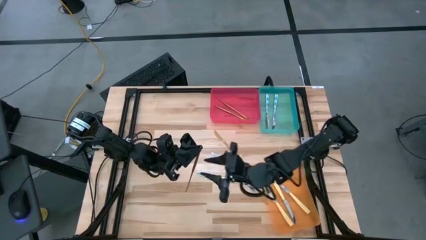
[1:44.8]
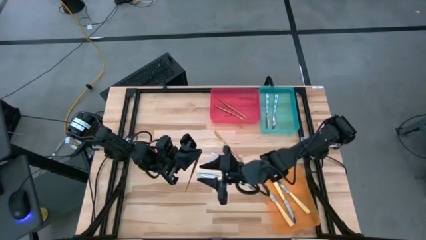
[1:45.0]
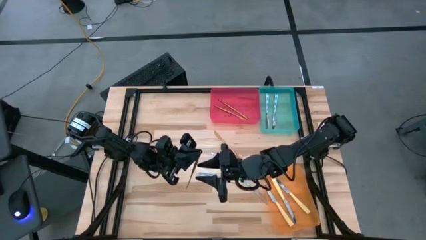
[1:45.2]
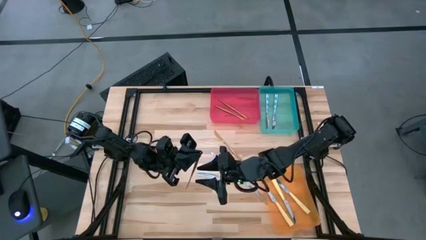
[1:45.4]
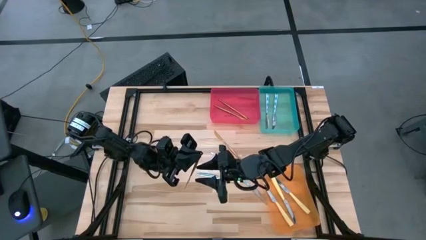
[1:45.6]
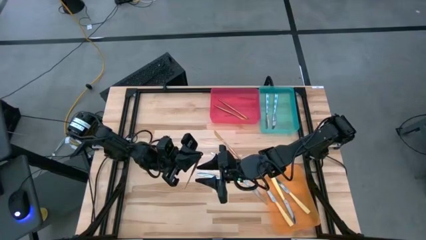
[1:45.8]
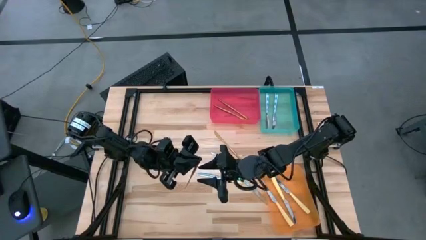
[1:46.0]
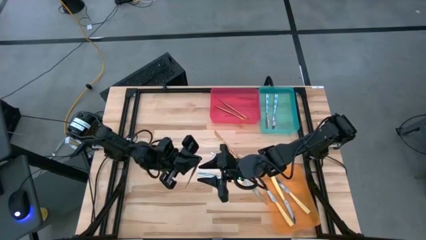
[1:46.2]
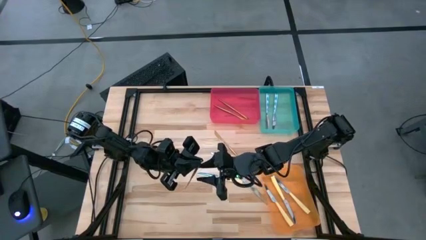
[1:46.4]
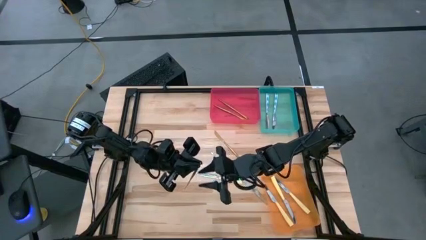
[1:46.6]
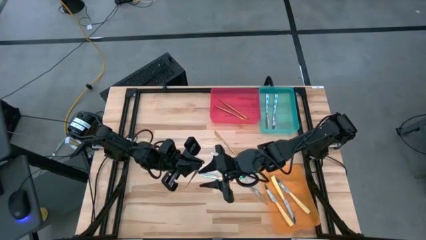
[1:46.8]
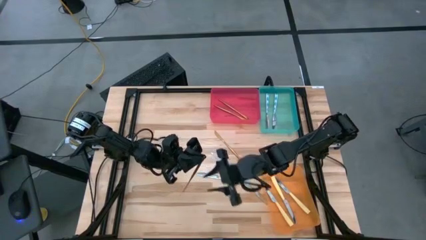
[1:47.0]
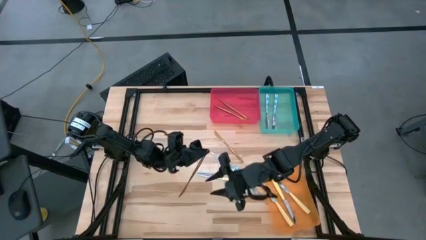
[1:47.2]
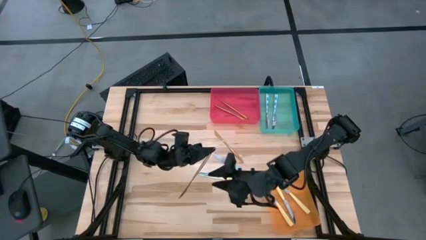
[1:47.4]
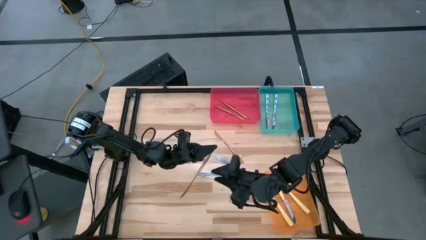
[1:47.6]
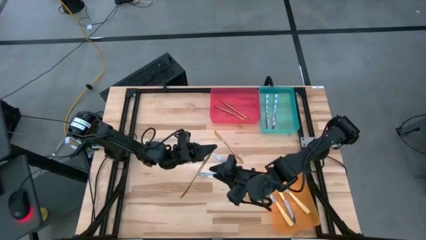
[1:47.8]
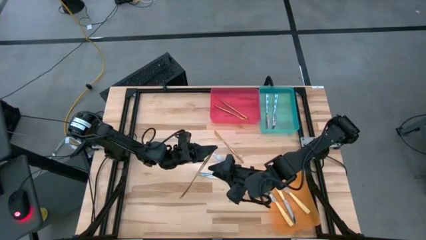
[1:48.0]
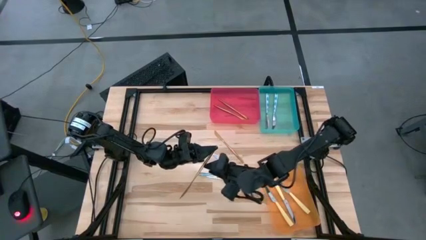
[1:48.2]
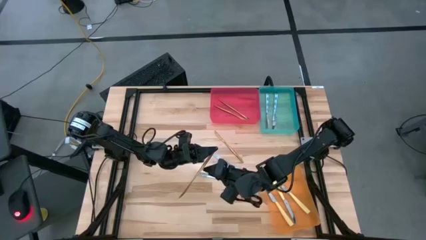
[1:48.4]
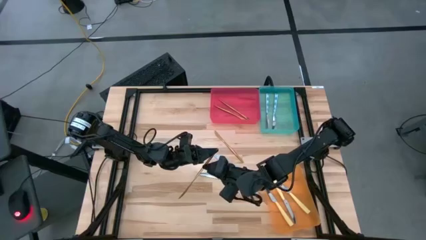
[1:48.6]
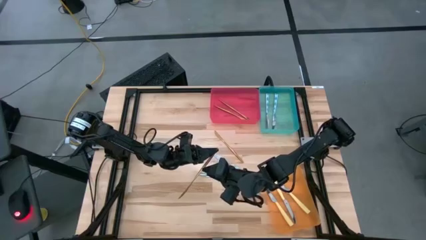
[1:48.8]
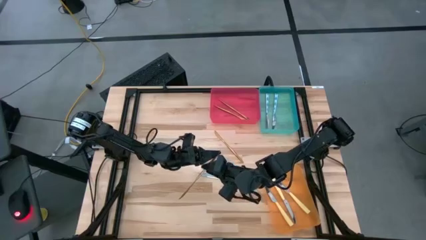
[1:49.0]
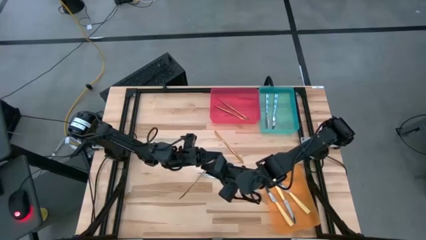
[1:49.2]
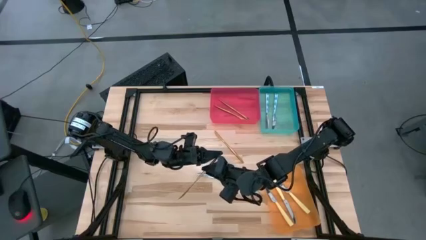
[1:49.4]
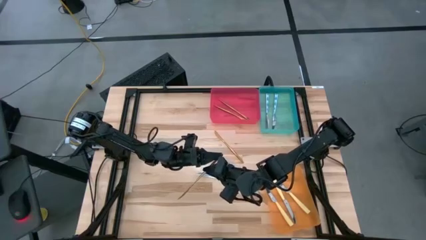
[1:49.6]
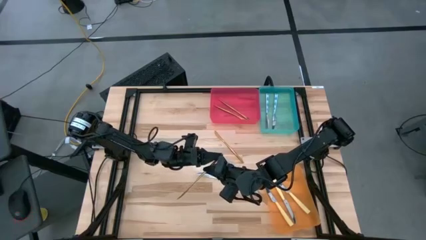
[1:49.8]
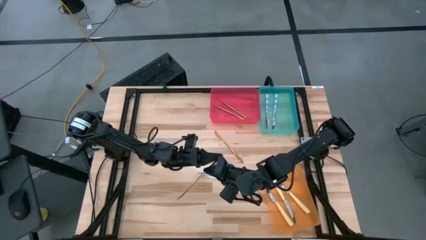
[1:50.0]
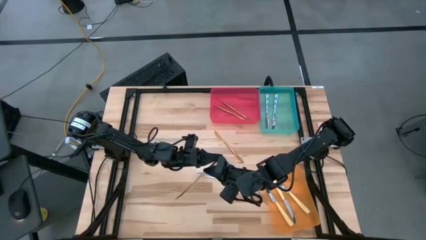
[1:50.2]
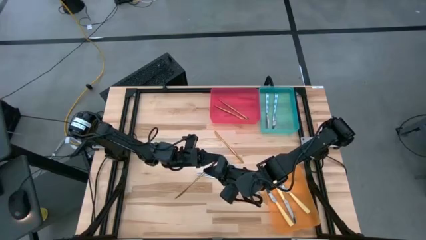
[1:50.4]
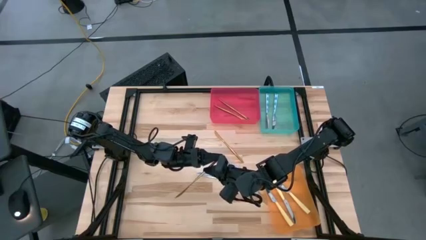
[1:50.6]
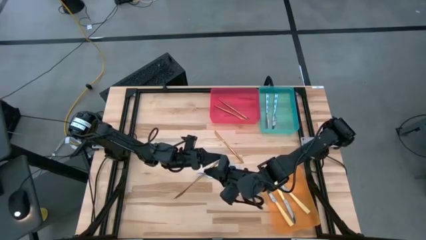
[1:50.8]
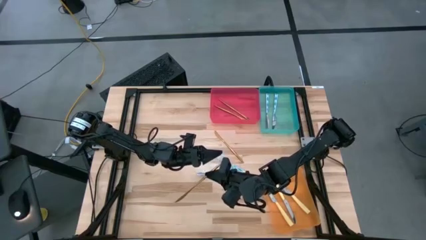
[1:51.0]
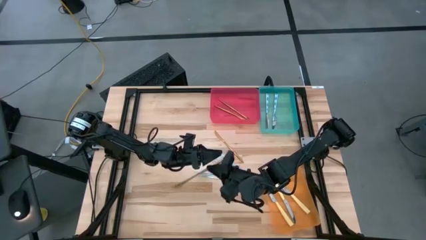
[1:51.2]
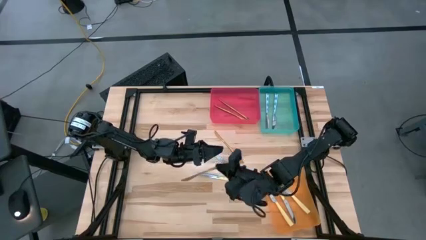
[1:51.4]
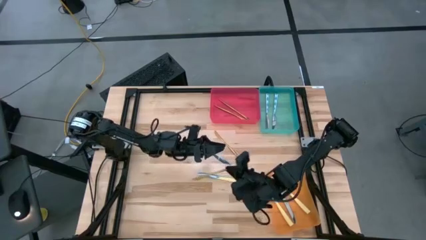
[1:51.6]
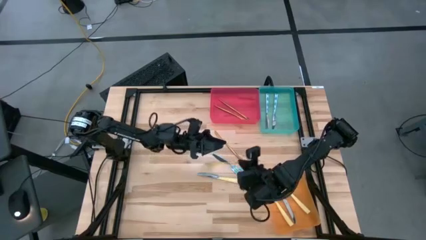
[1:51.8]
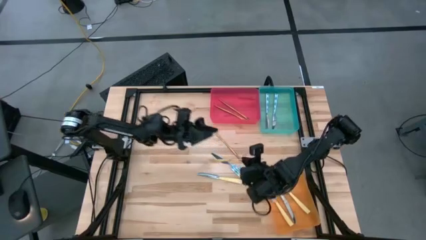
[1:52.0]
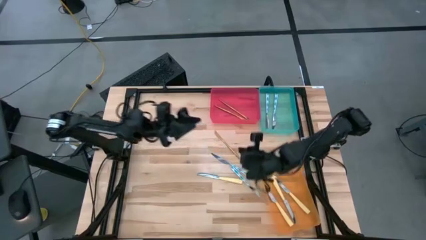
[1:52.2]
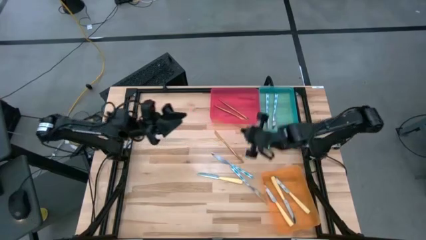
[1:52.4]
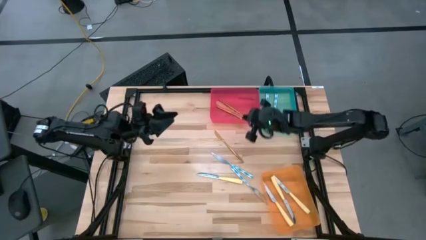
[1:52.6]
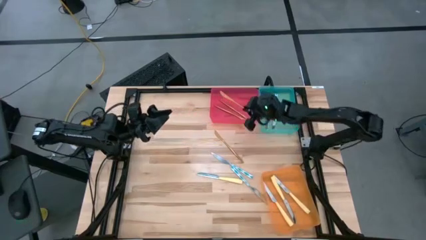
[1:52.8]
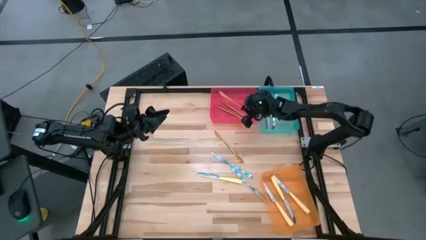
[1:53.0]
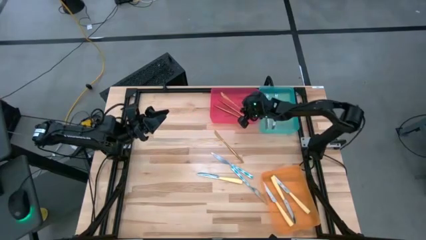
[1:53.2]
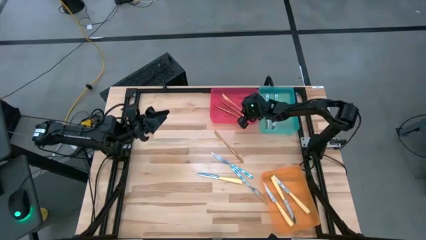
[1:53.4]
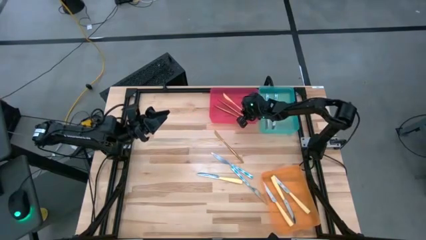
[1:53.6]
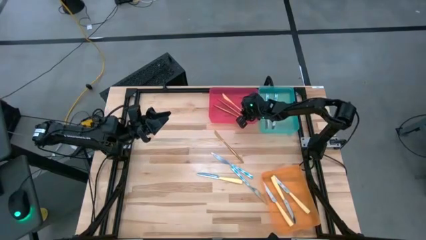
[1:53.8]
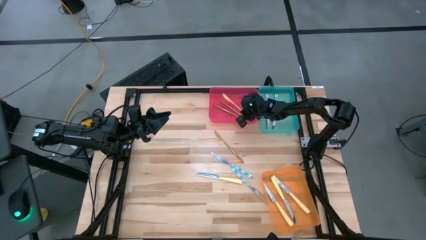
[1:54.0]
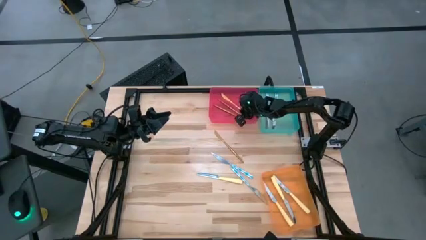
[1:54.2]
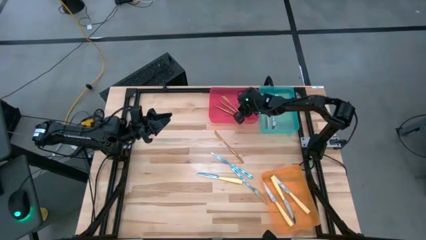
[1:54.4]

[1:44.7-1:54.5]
Task: Sort silverware by color (type)
Put the golden knife into the red bin

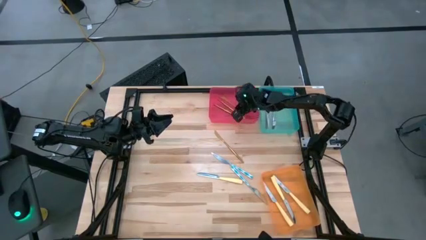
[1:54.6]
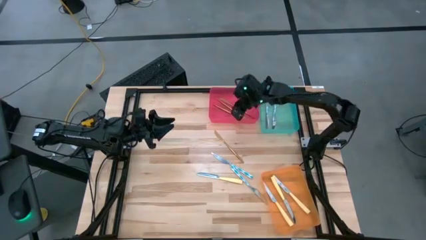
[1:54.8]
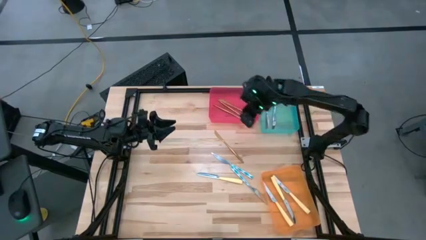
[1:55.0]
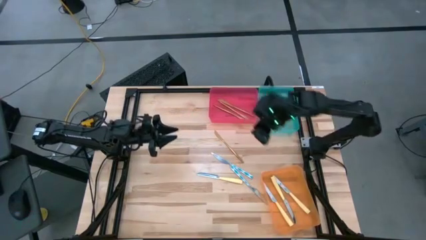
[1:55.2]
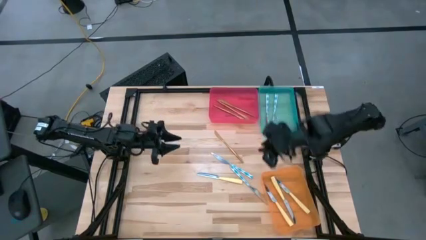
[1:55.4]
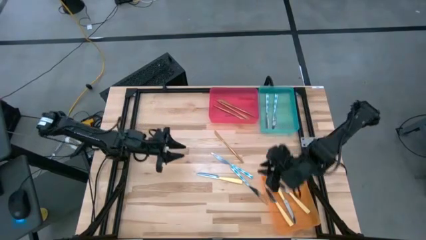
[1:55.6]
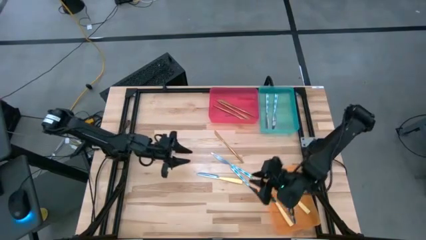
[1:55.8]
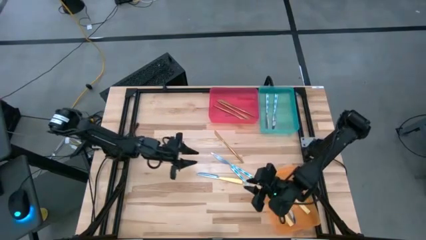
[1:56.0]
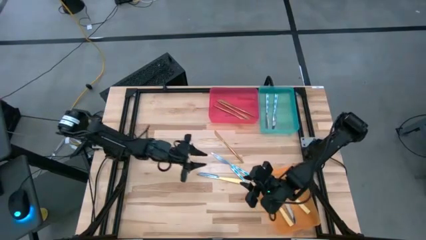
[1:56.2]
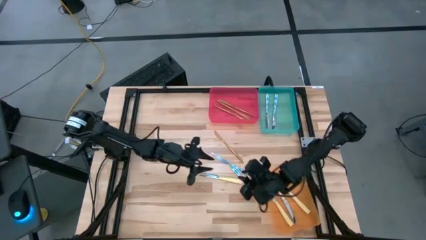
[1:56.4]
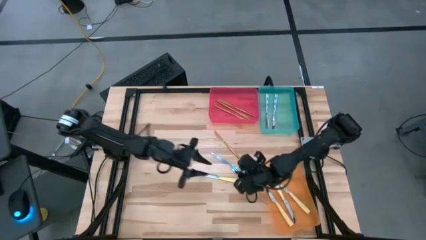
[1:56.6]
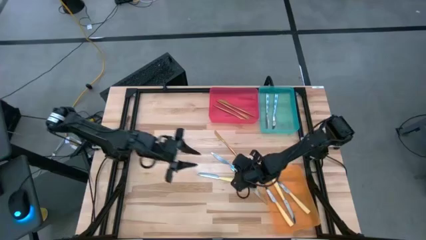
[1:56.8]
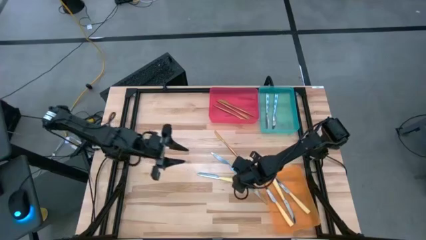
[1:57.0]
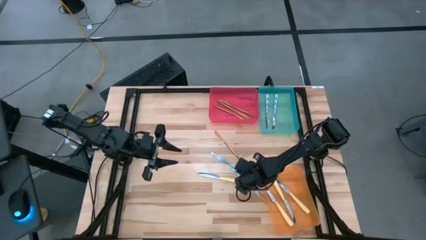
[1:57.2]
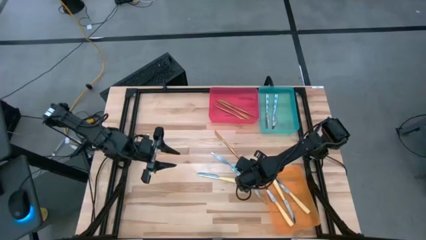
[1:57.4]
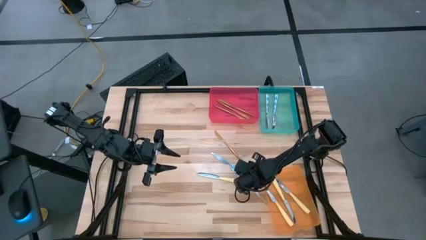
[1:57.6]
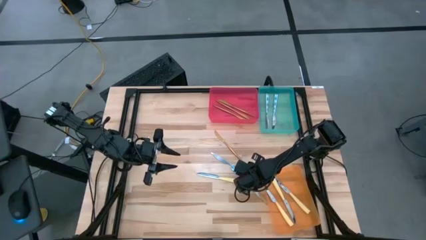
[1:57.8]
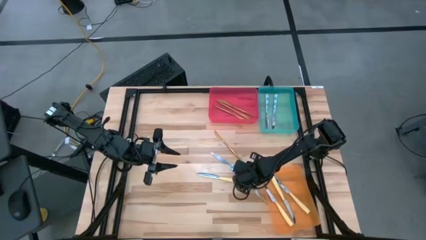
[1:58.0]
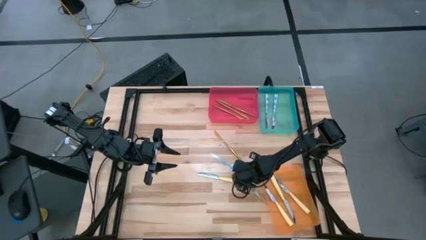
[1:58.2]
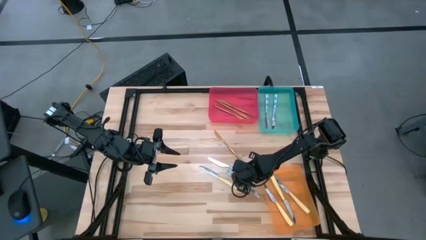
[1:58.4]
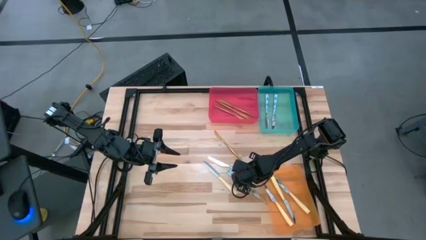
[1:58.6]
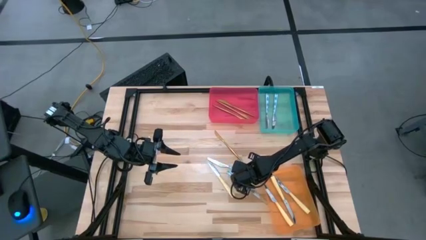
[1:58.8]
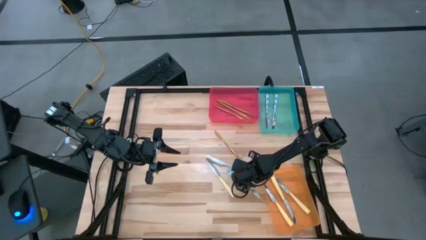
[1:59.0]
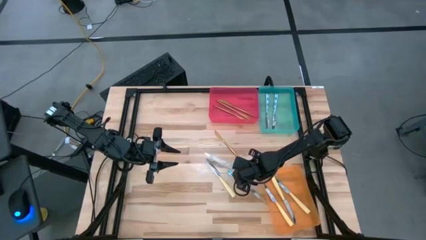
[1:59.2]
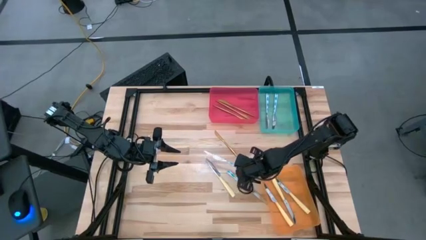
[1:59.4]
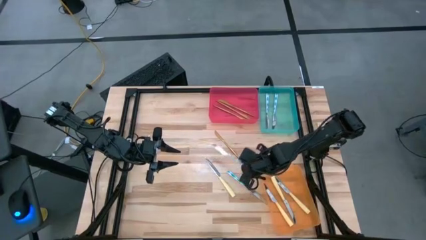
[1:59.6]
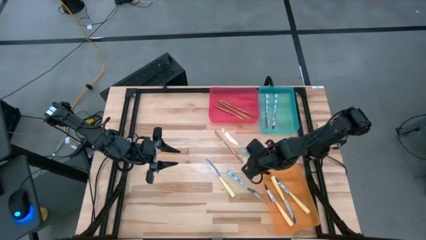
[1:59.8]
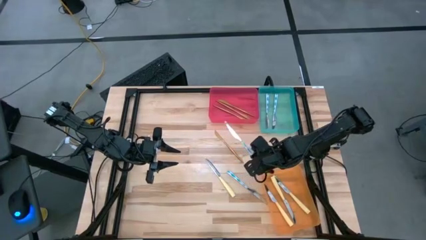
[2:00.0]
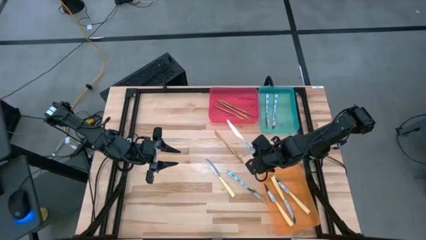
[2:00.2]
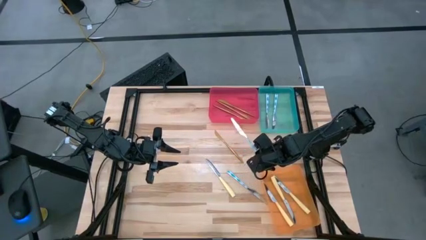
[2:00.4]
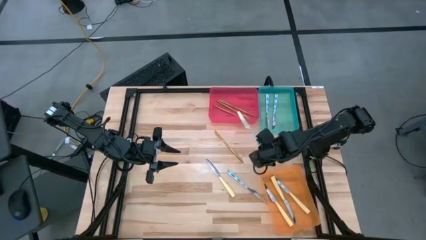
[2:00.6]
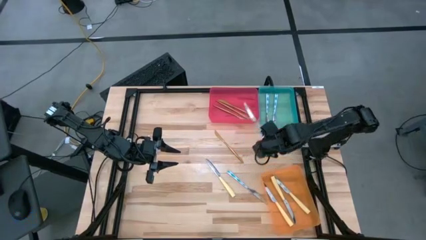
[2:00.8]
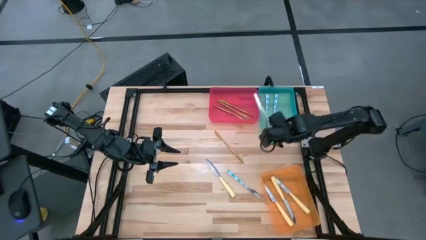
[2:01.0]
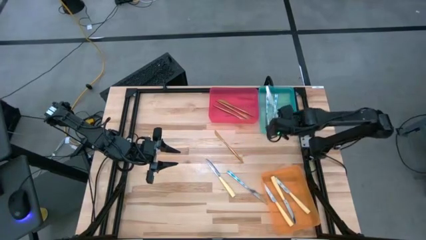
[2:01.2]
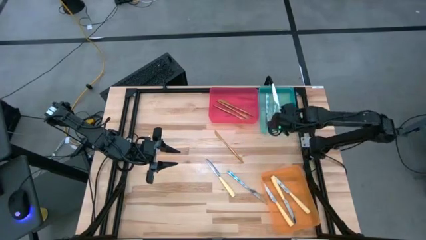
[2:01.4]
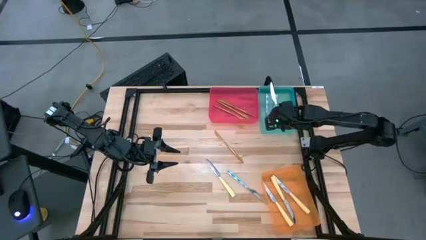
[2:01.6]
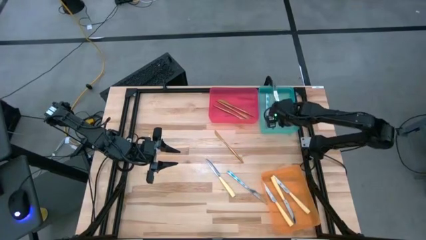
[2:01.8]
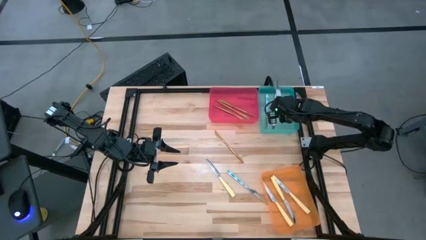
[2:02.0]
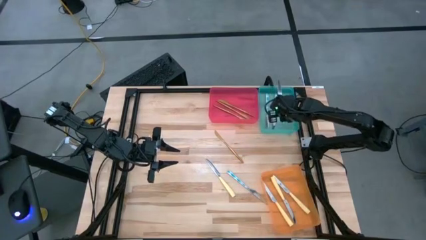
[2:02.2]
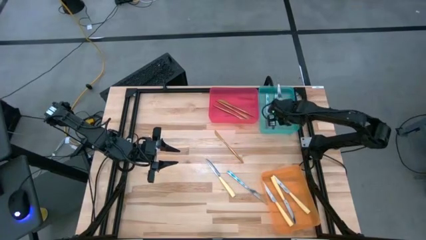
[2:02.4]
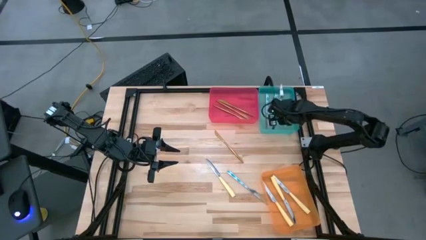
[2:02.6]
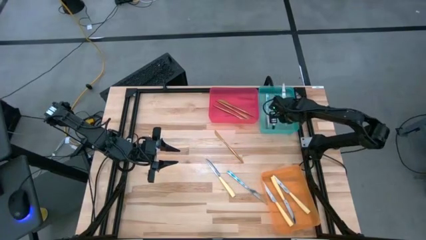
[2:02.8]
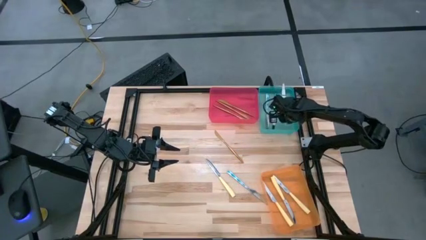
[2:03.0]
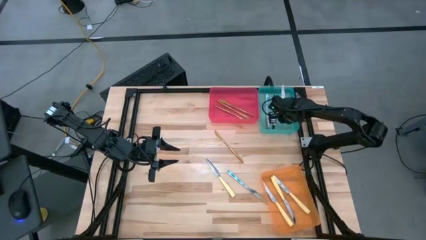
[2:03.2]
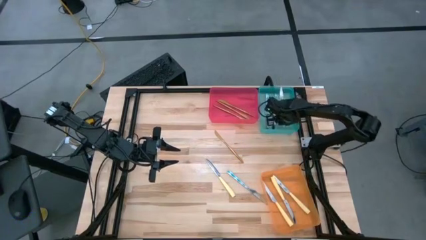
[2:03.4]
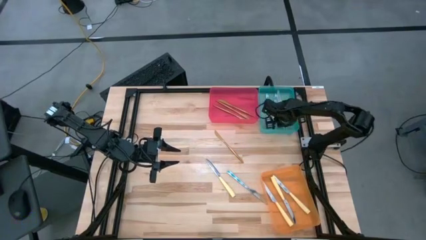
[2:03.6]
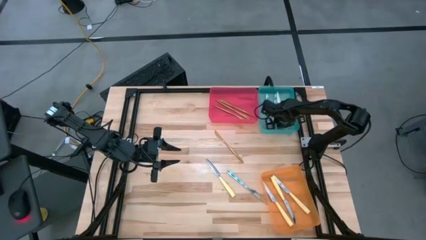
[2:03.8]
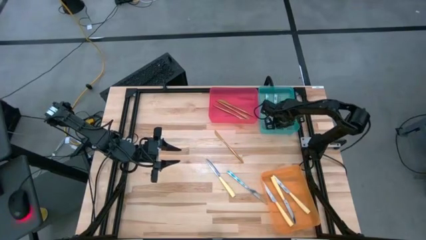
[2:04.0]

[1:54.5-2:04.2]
Put the blue knife into the blue bin
